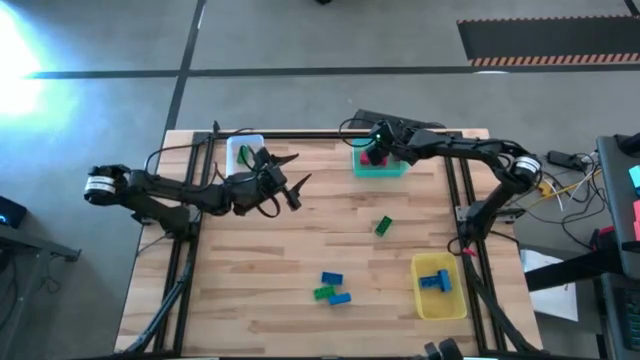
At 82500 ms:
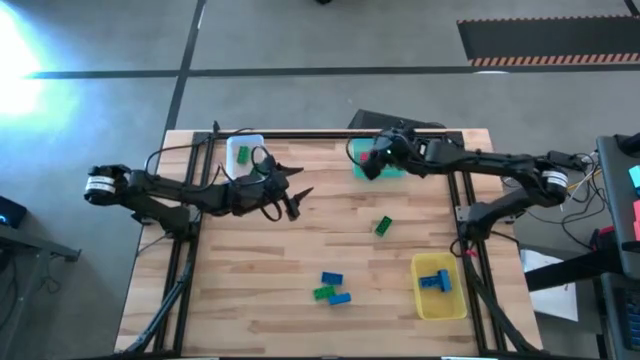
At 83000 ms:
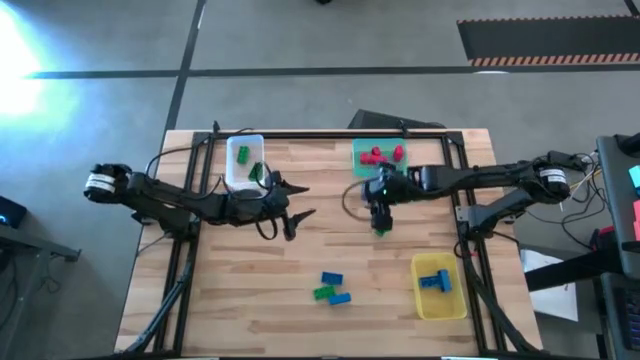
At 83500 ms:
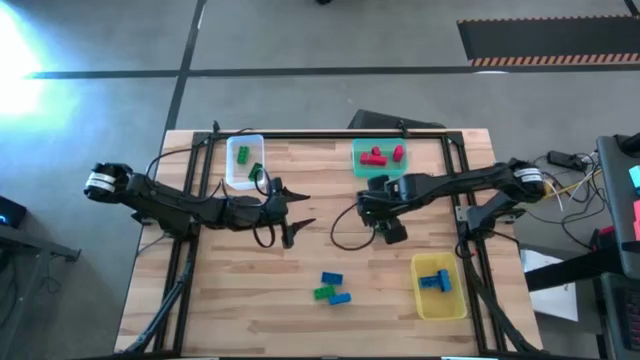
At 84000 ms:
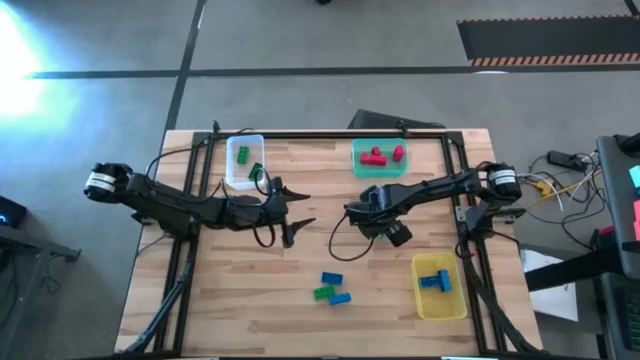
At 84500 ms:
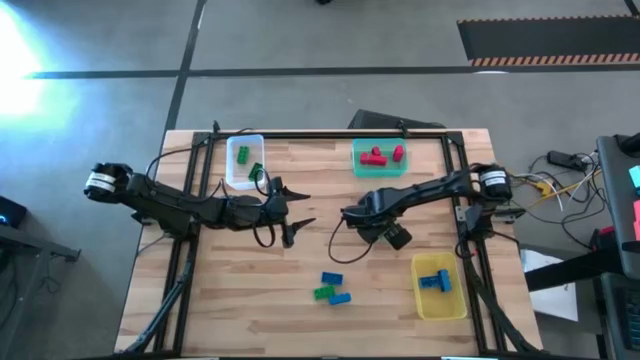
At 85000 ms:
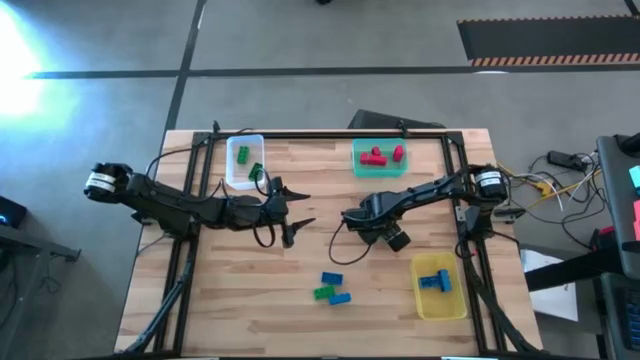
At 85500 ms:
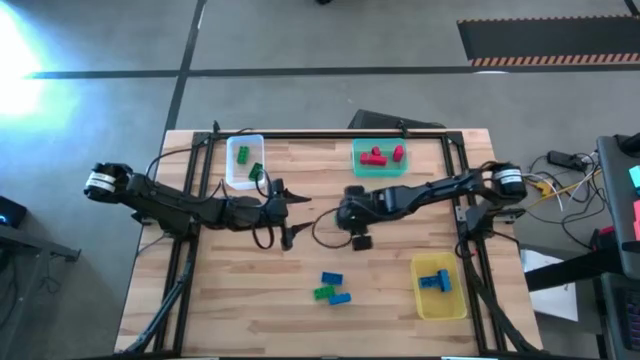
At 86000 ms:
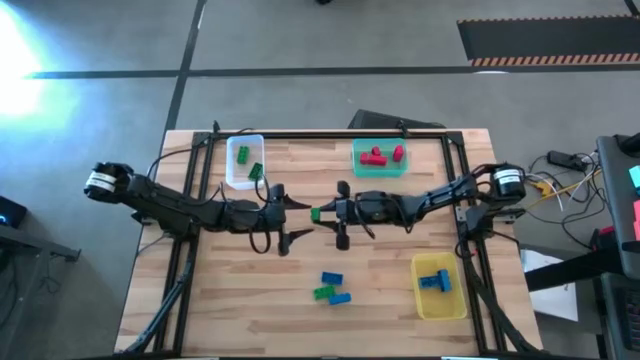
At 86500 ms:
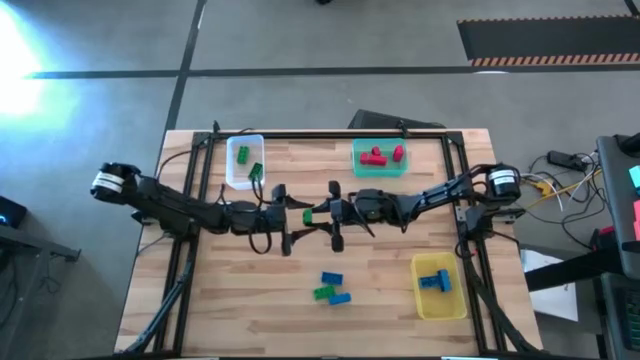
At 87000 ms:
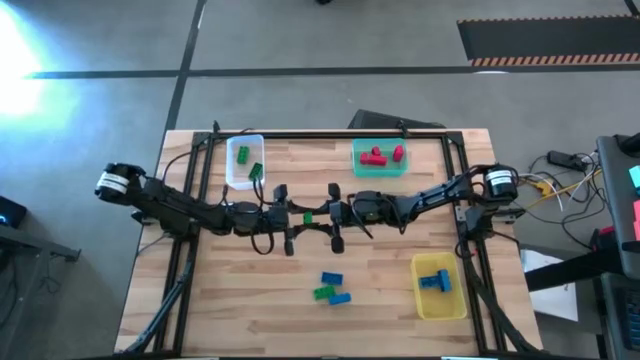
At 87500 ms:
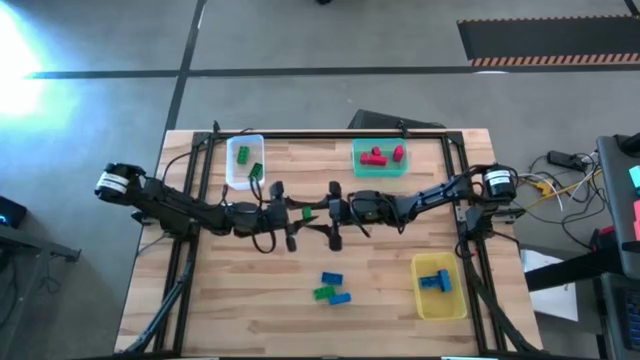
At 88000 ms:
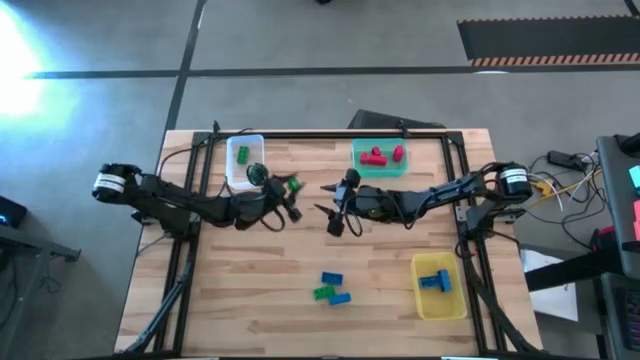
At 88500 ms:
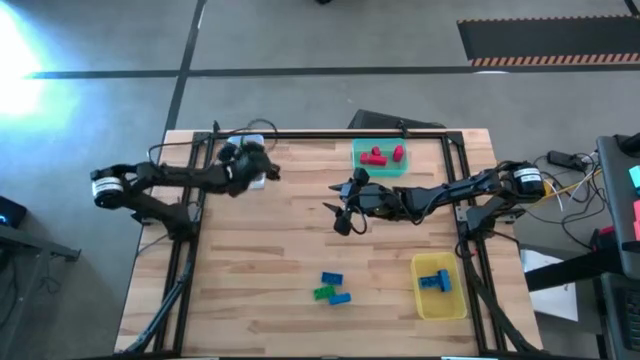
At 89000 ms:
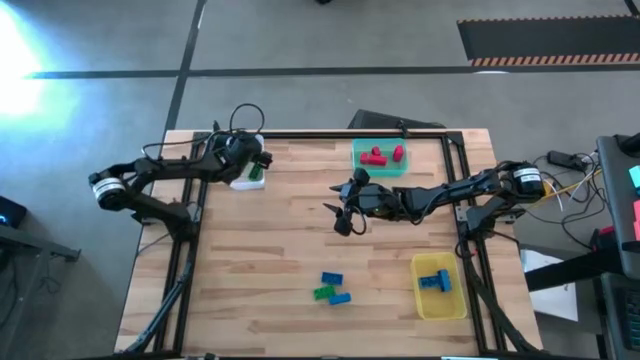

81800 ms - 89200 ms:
Task: Sort & place blocks by color
Put the green game piece into the white bin

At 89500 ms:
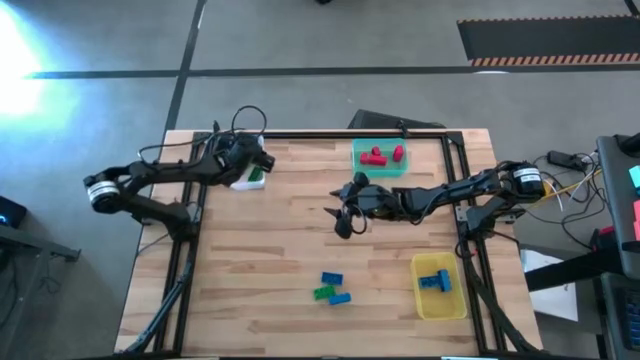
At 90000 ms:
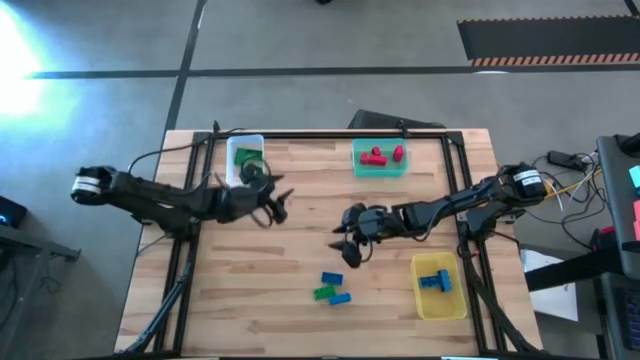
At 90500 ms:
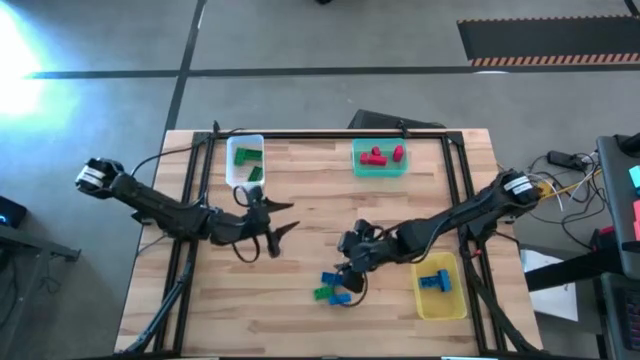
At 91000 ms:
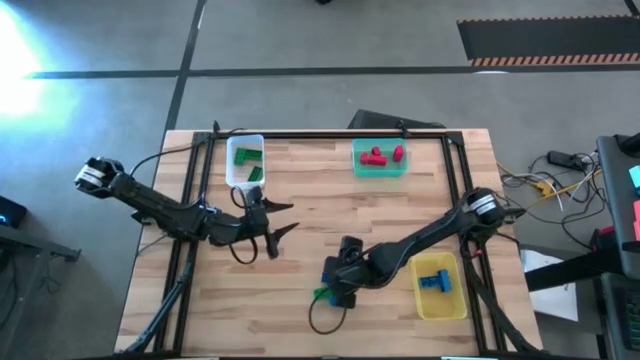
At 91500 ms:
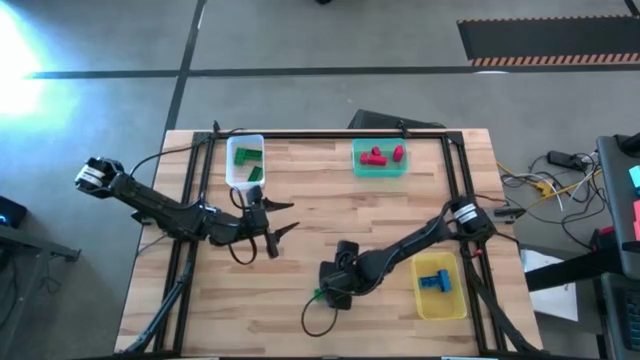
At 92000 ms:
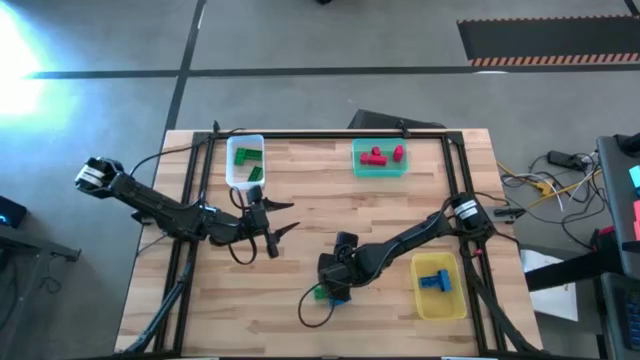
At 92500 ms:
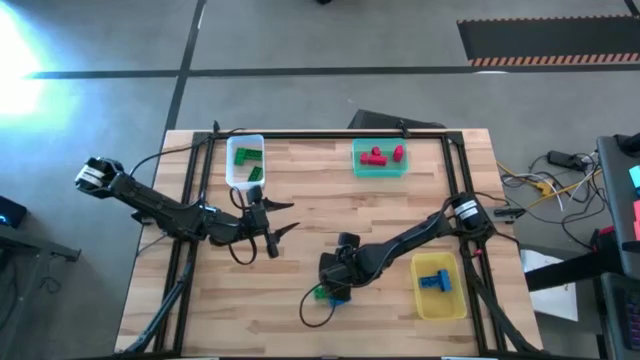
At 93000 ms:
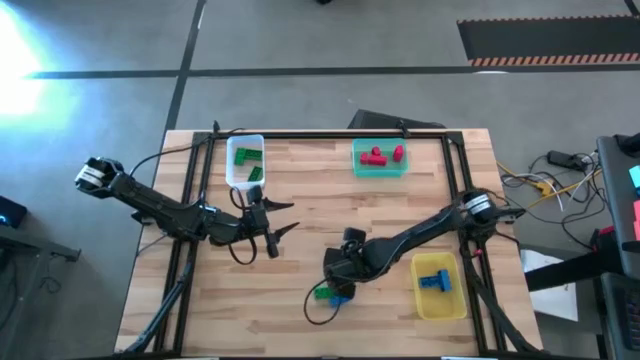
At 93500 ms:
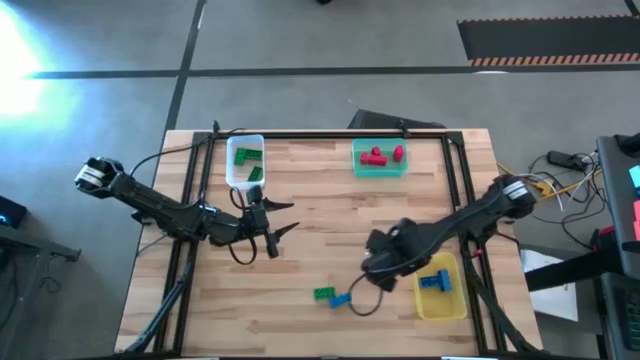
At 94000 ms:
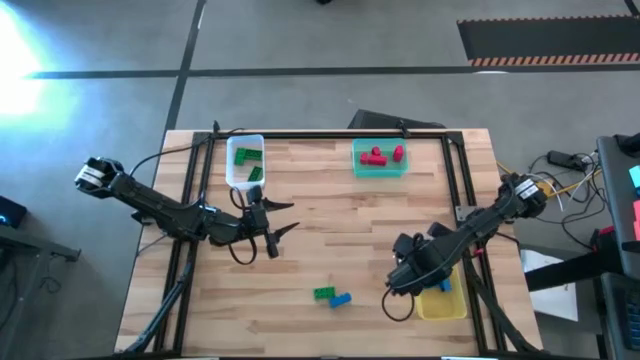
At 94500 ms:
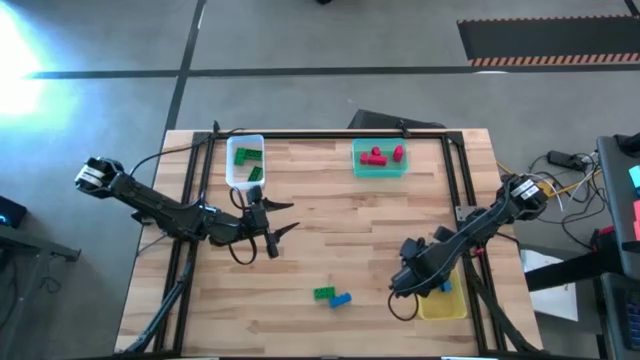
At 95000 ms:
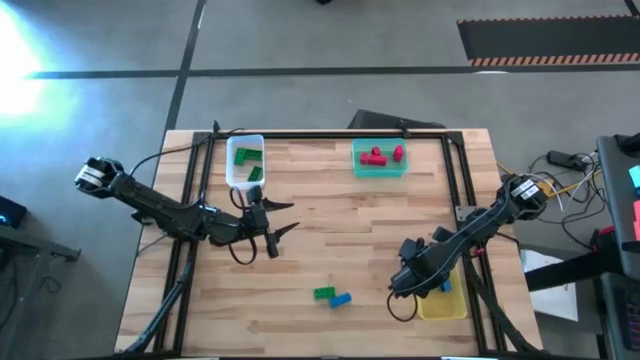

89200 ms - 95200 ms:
Put the blue game piece into the yellow bin

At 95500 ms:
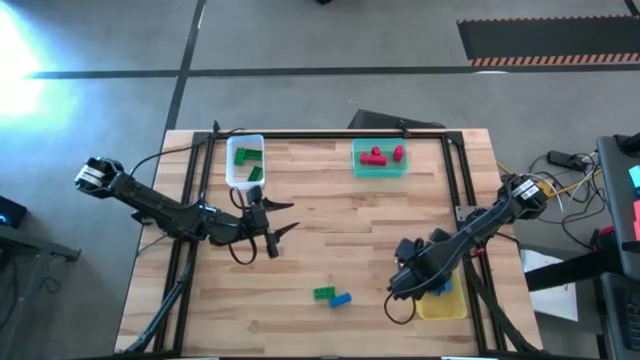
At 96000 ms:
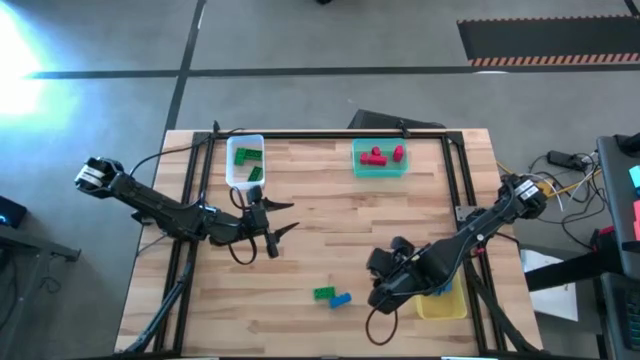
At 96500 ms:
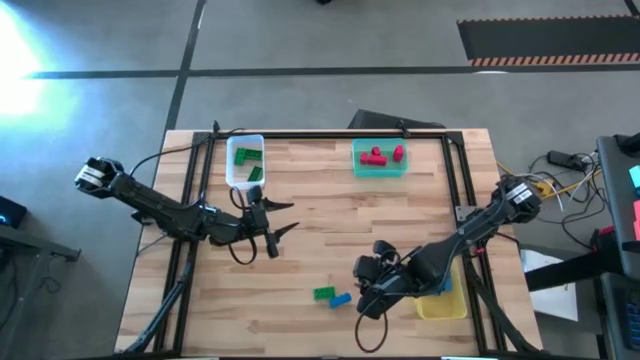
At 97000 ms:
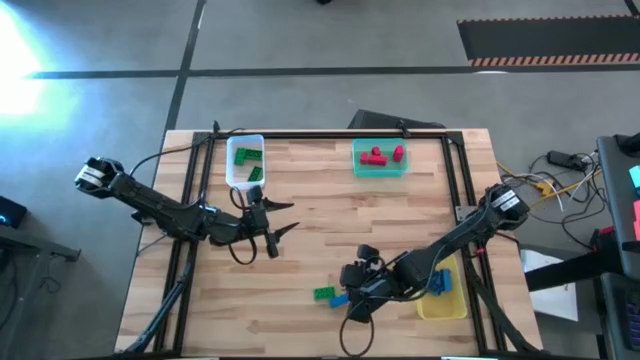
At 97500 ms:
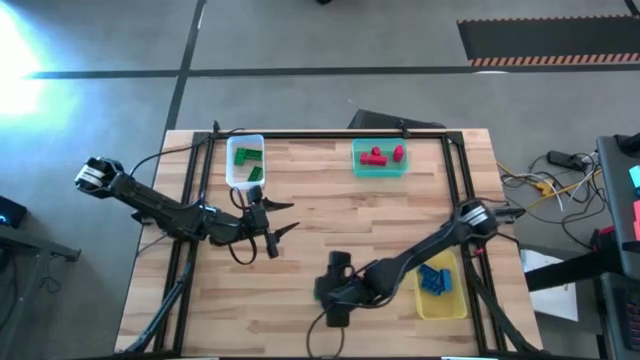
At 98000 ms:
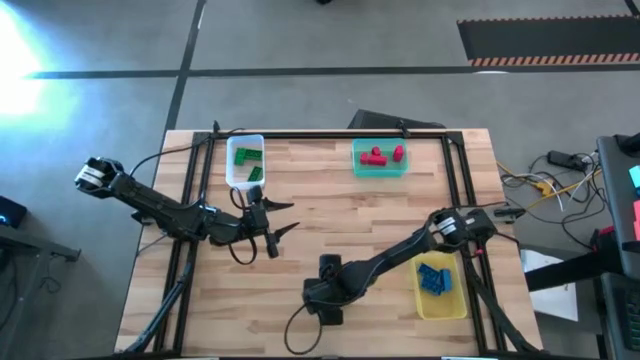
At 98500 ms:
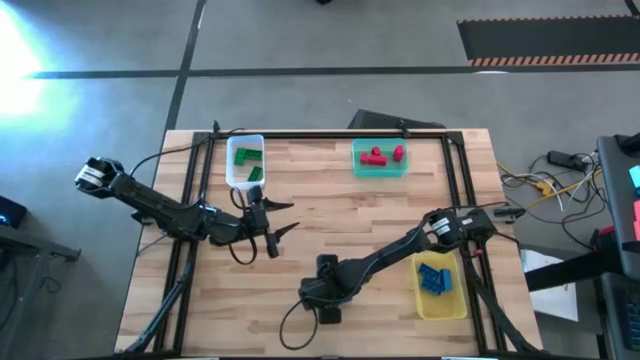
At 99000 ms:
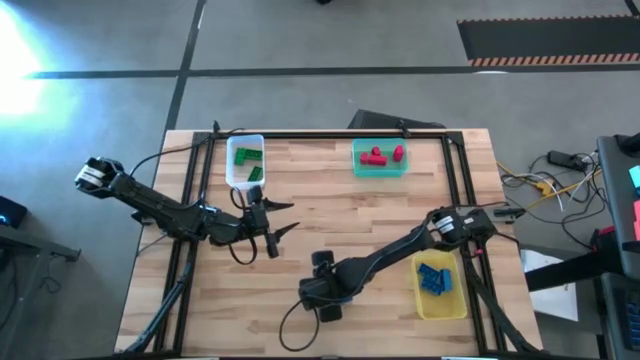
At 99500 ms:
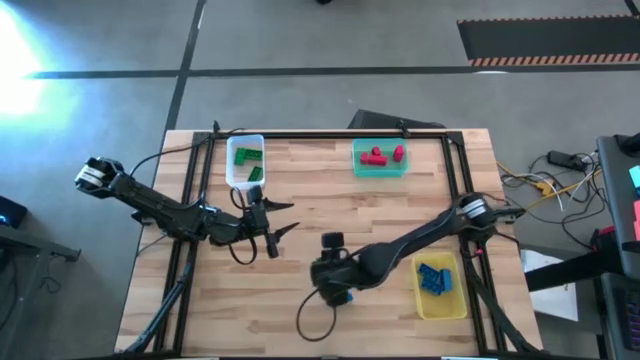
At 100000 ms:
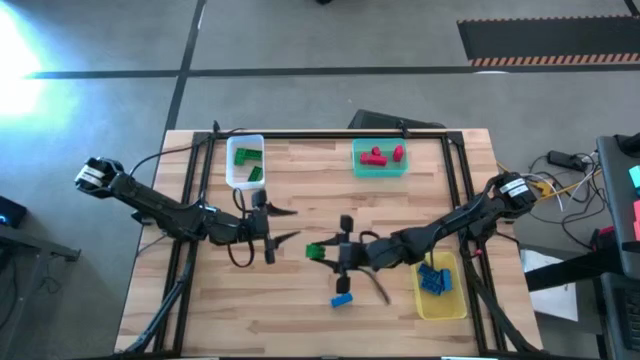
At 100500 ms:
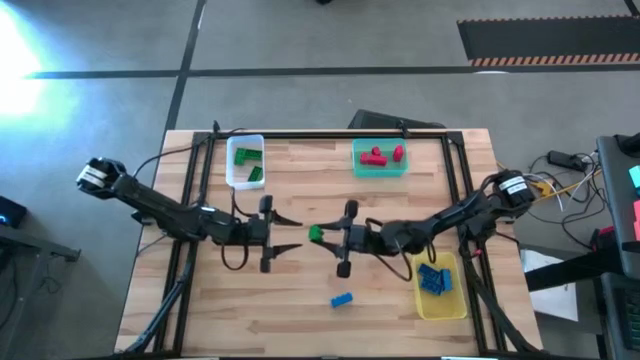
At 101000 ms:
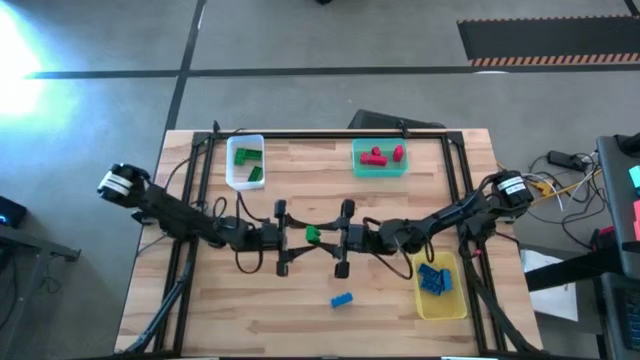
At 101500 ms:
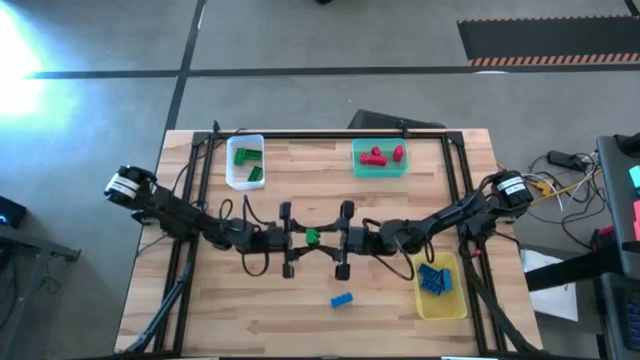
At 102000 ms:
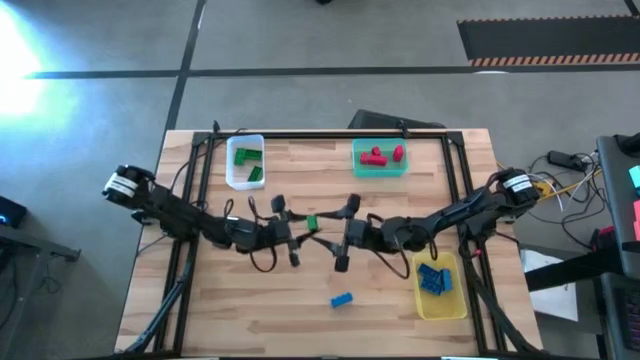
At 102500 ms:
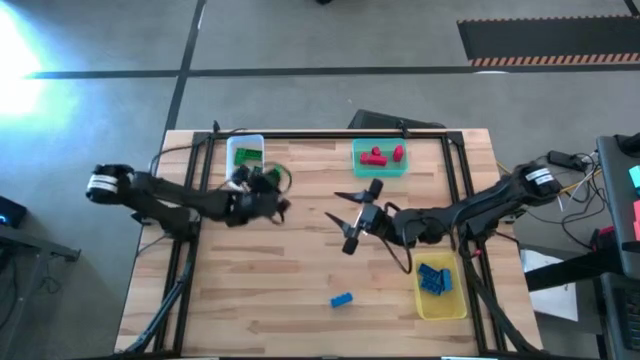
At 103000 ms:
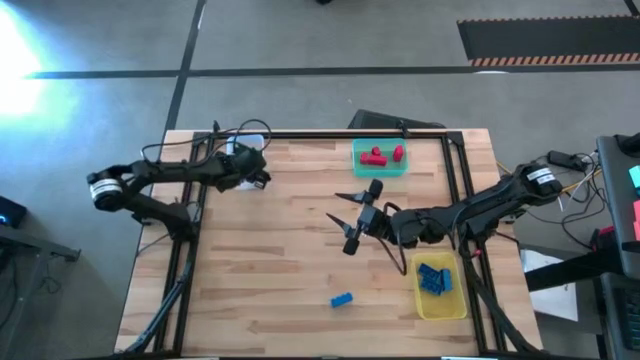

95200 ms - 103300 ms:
Put the green game piece into the white bin
